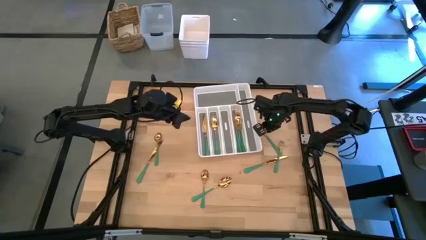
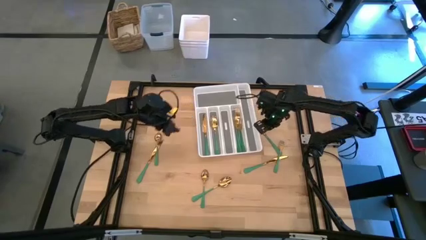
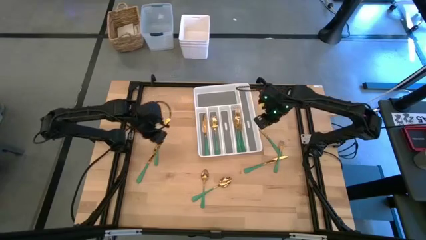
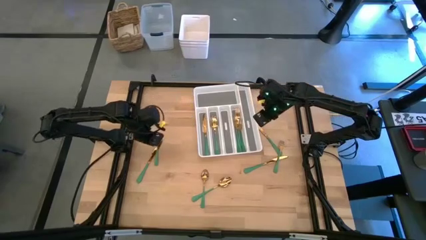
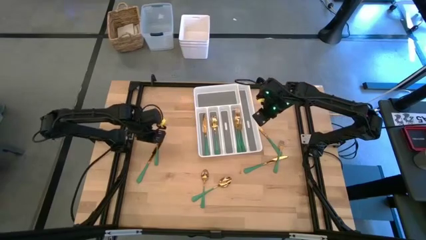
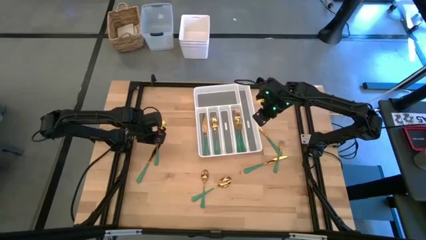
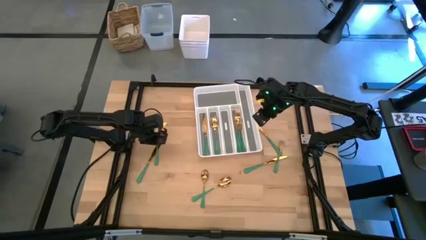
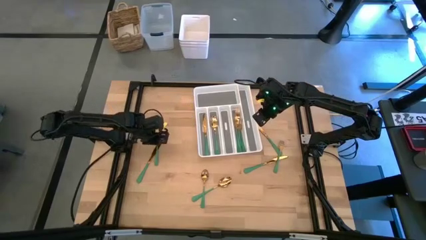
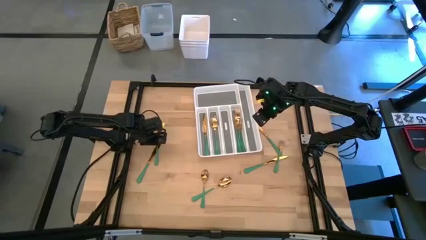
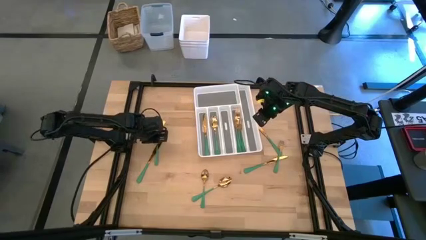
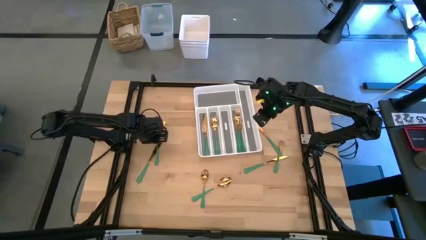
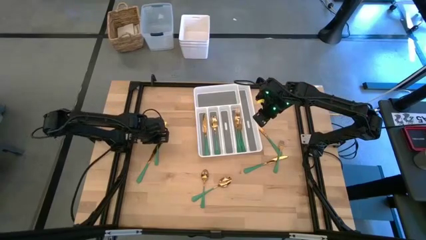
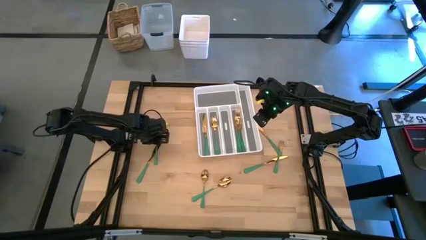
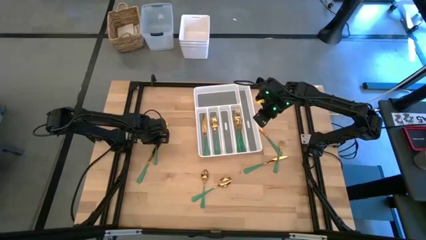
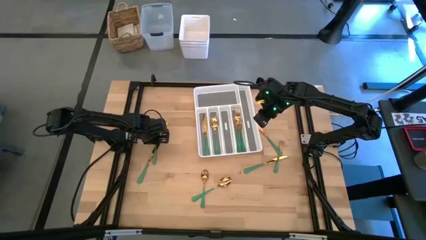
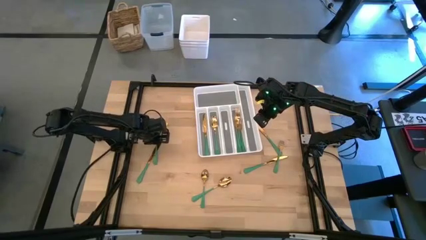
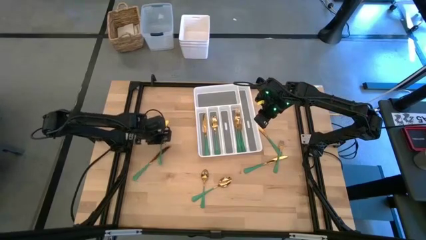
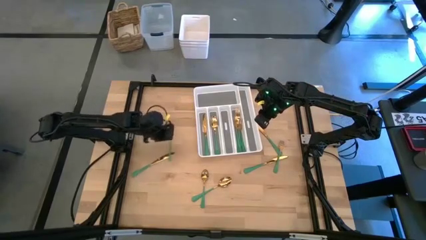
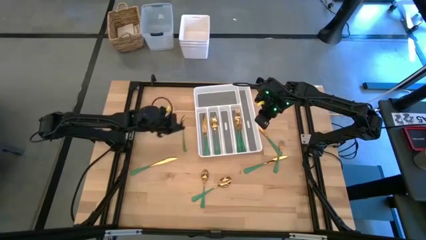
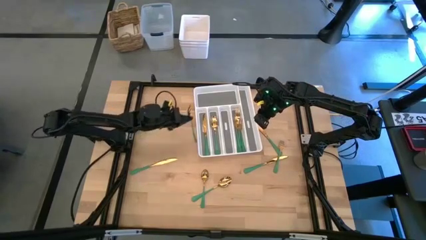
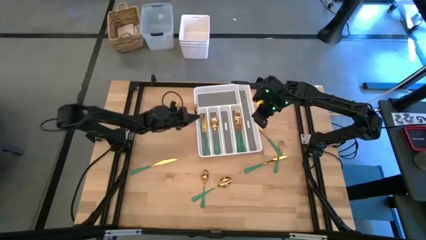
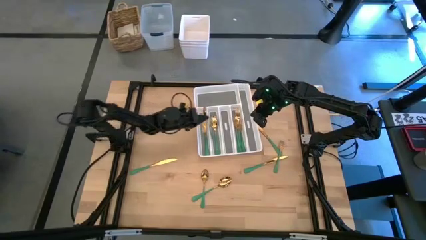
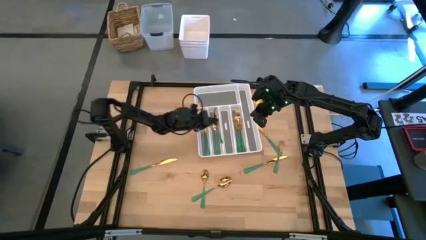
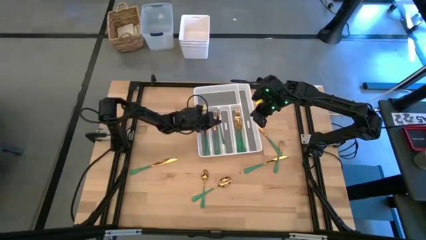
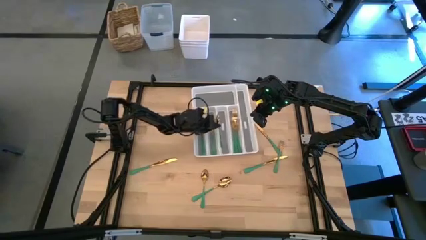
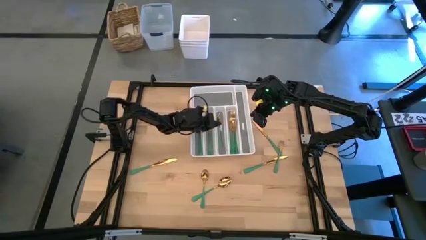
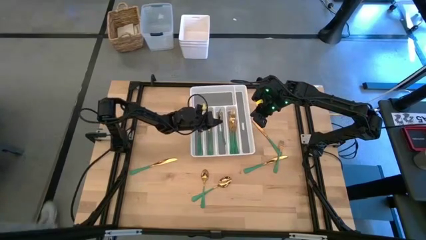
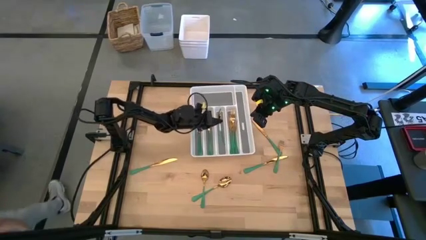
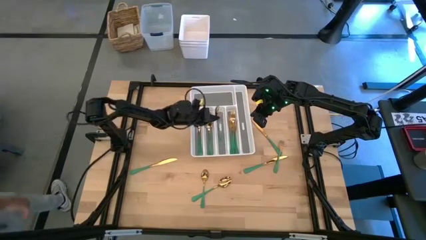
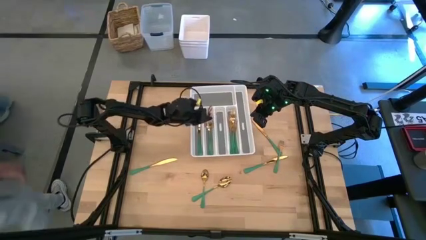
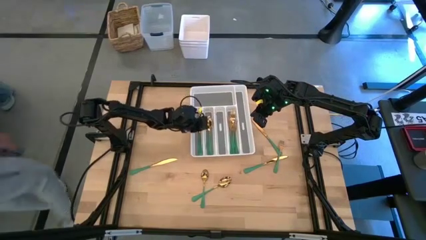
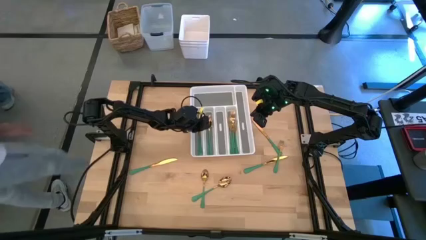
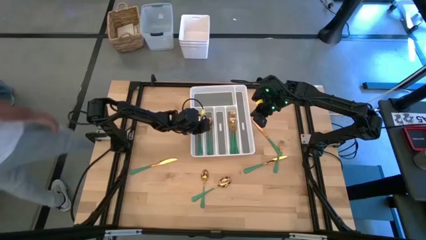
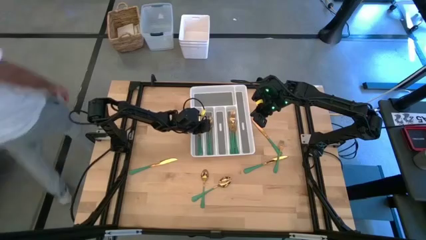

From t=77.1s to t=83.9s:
Task: Sort silverware
Put the top left spoon into the silverware organizer

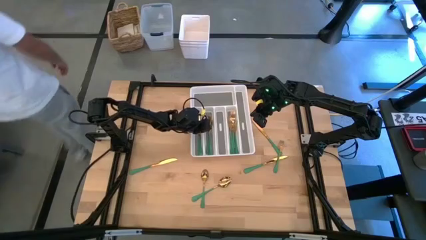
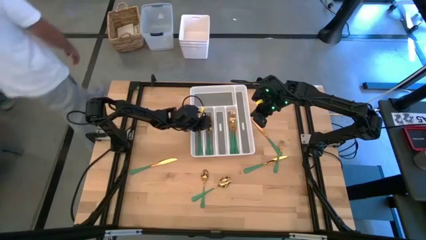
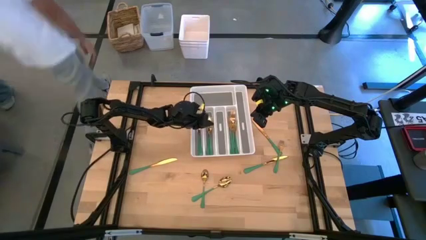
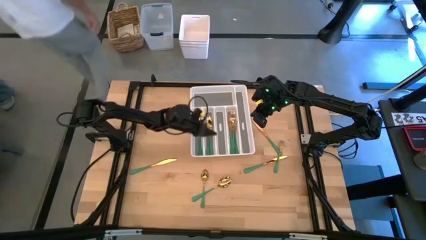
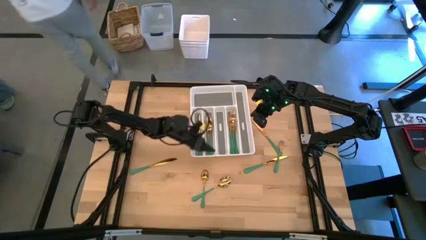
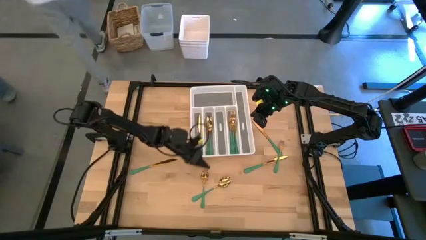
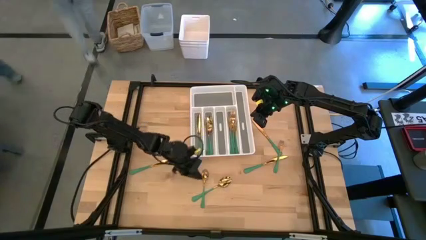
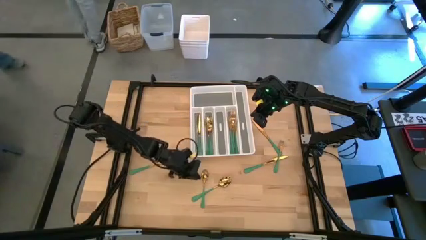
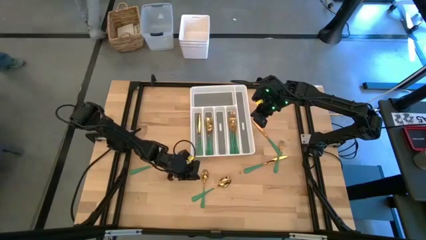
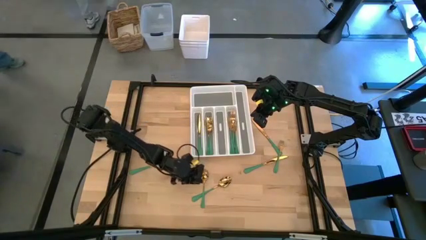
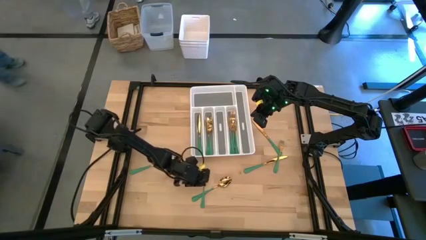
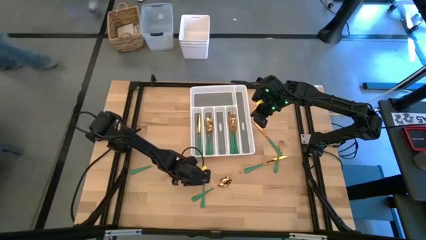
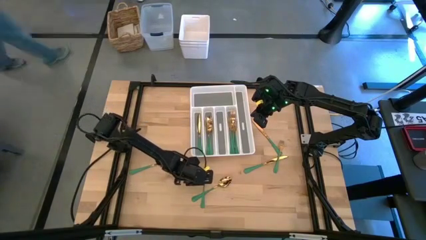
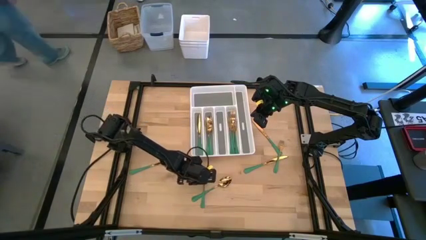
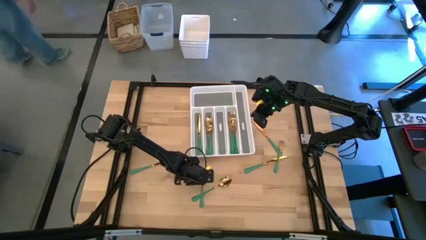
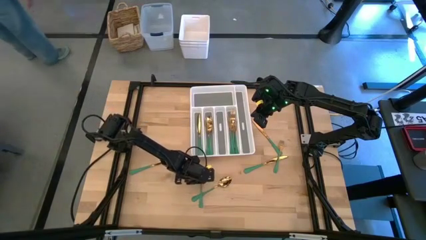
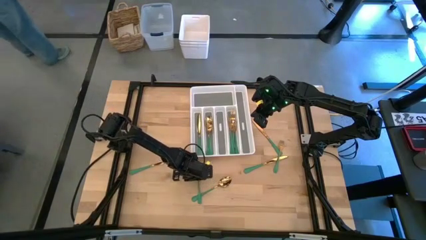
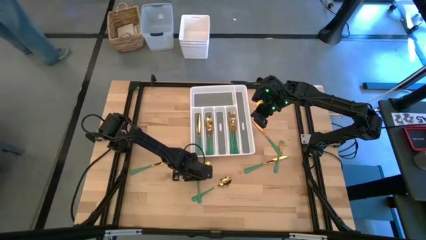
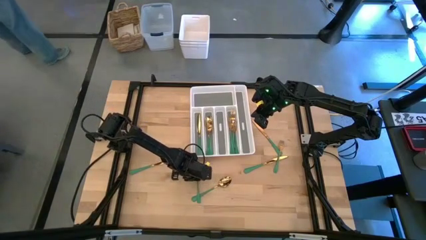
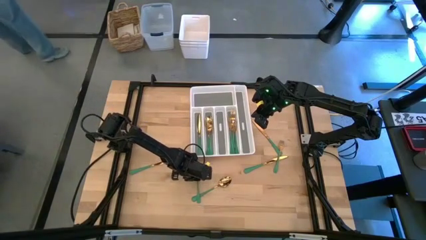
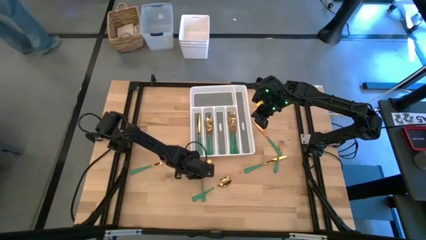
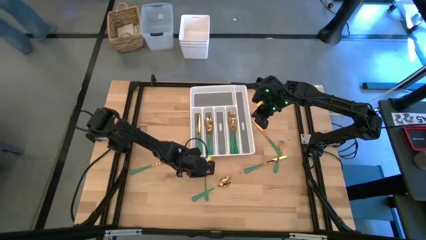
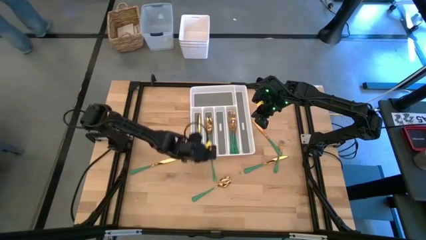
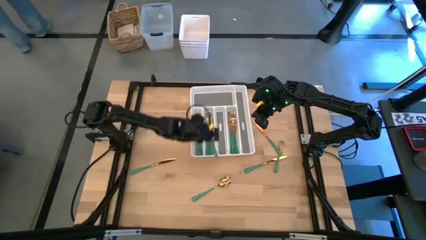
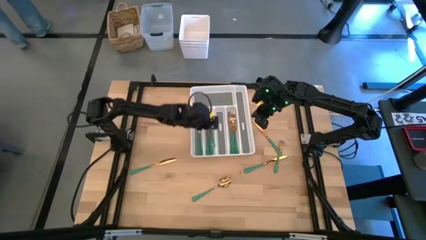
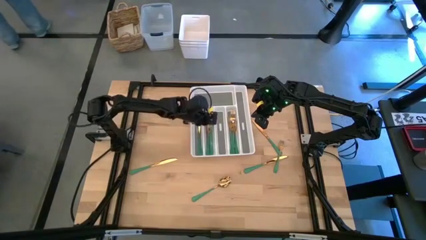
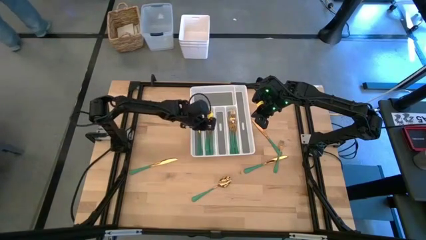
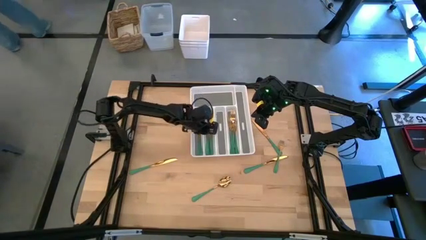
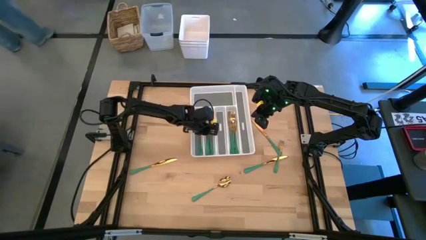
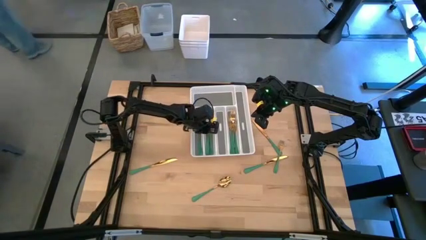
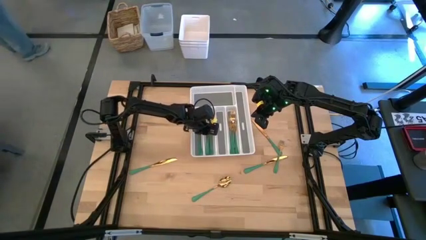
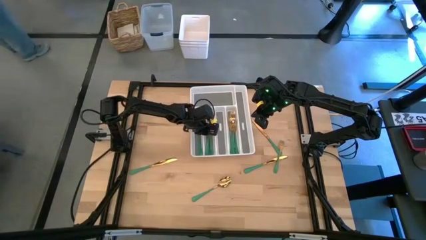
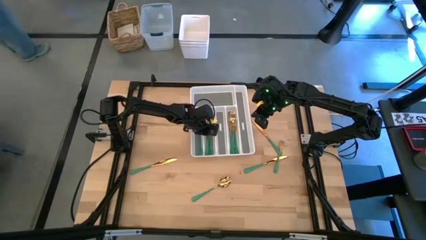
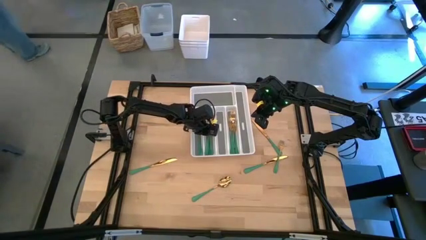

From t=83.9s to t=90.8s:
Put the left spoon into the silverware organizer

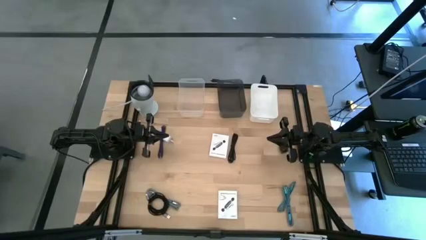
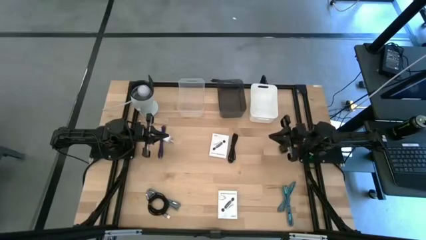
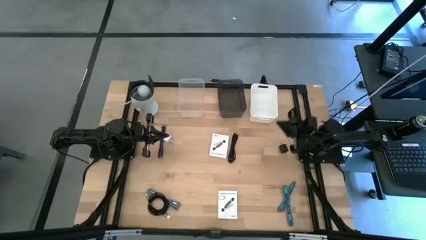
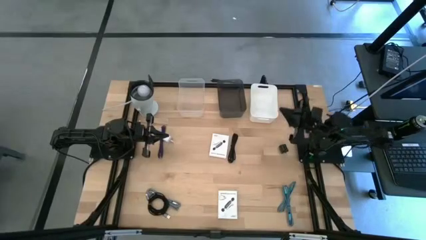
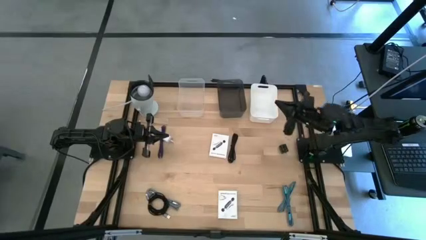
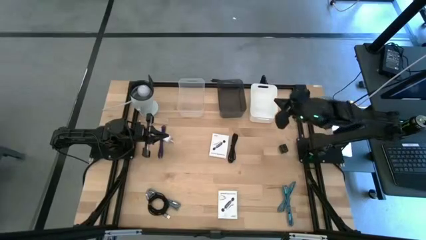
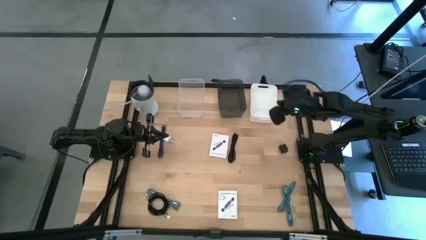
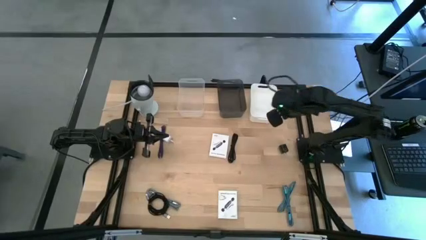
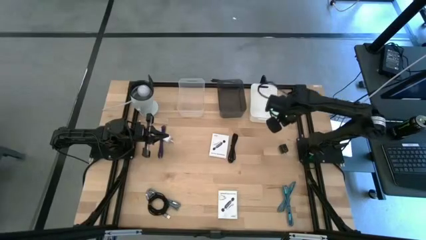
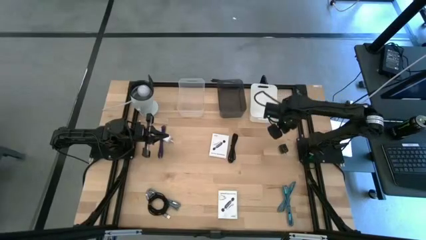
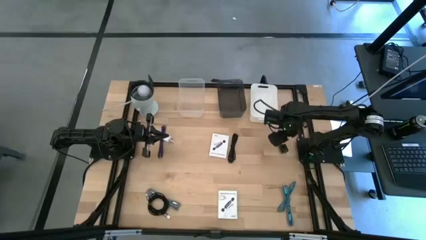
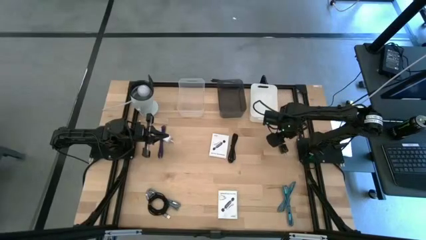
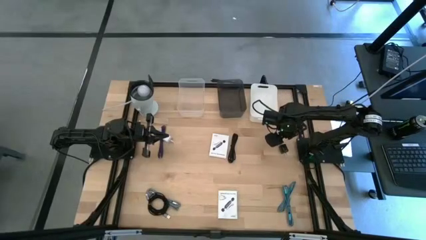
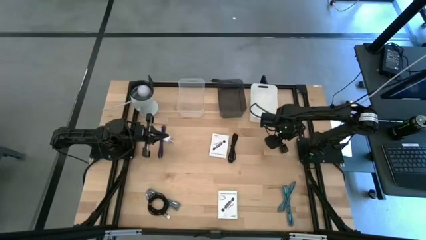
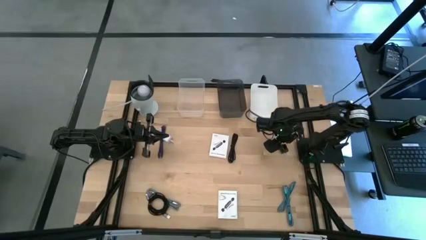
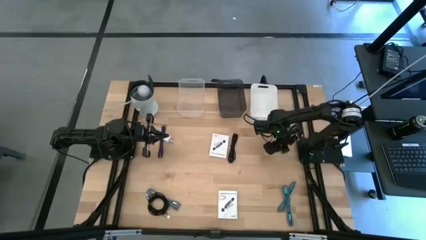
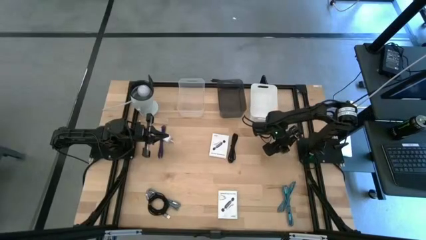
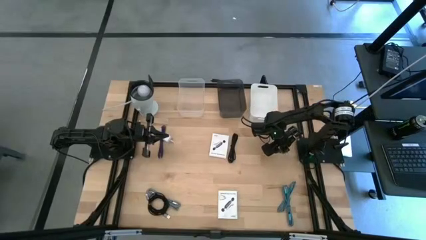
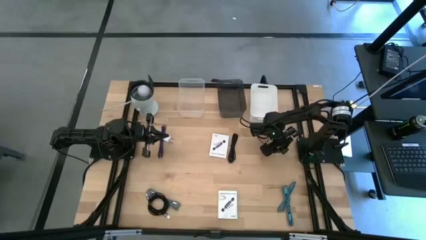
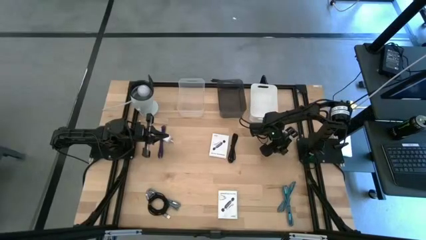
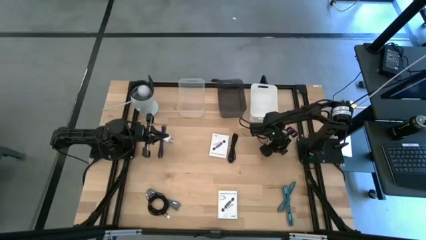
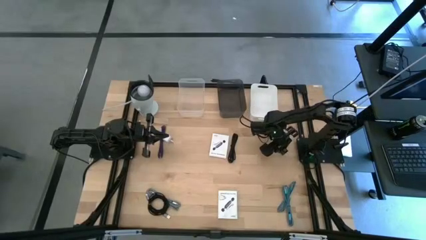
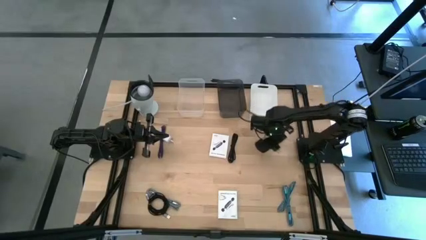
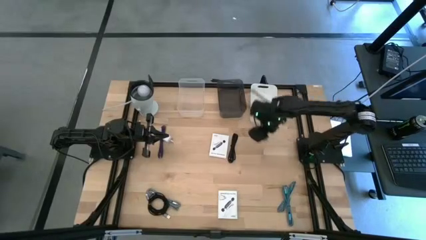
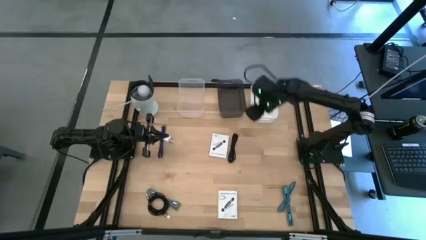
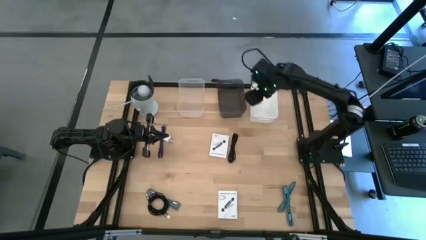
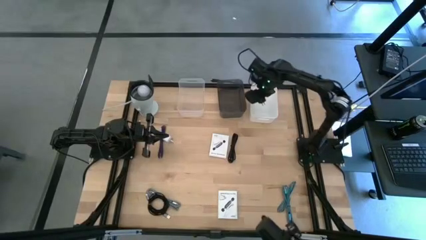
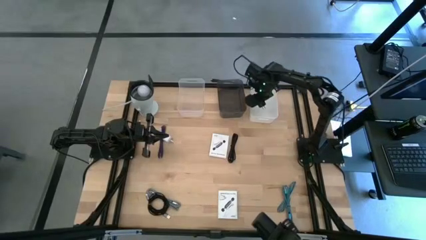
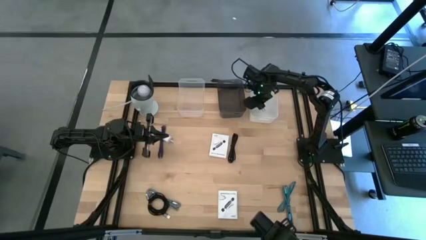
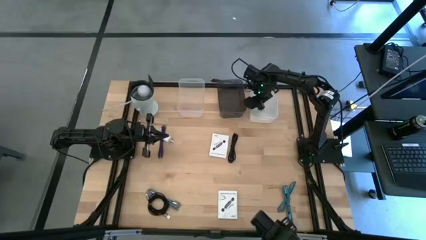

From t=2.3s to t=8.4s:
Task: Pick and place items into bin
Put the black charger adapter into the white bin
